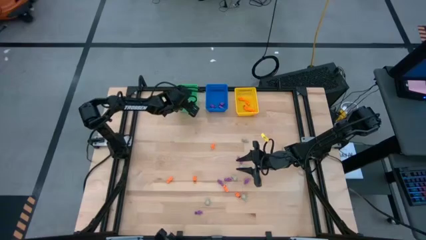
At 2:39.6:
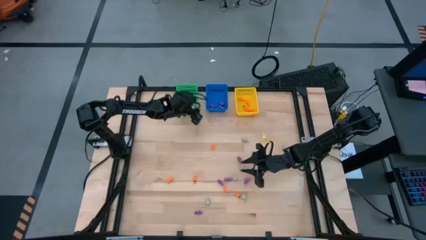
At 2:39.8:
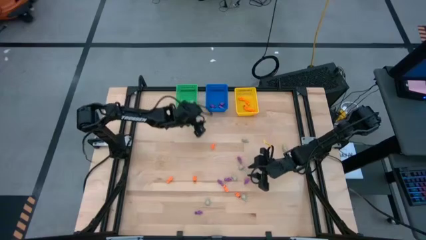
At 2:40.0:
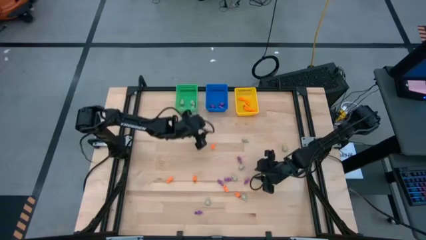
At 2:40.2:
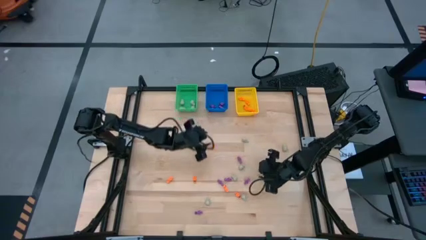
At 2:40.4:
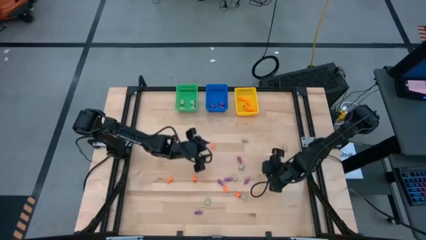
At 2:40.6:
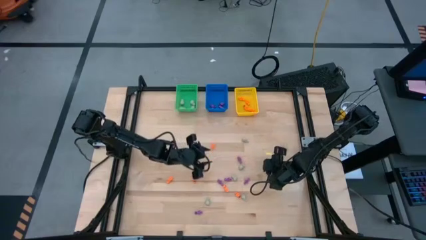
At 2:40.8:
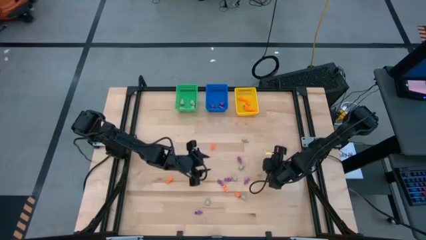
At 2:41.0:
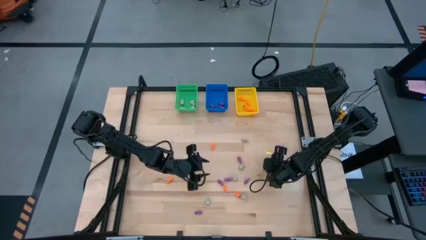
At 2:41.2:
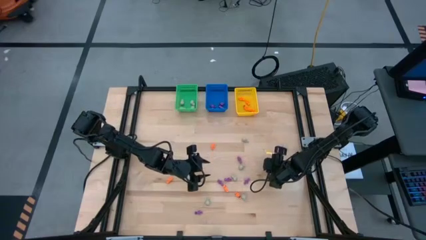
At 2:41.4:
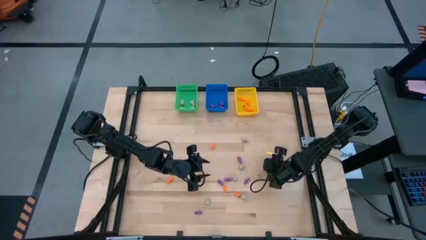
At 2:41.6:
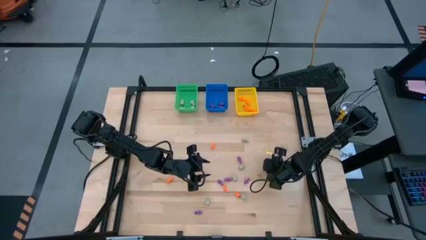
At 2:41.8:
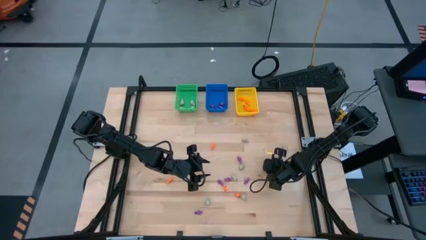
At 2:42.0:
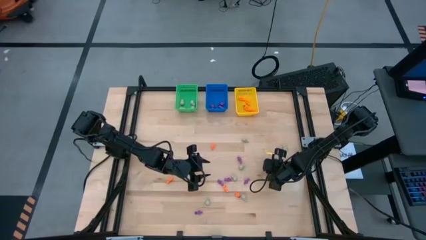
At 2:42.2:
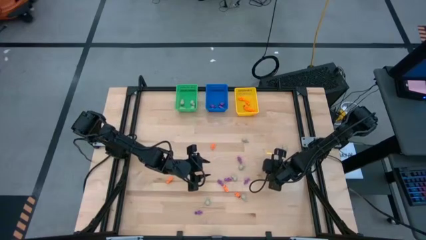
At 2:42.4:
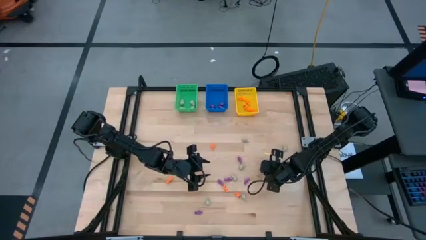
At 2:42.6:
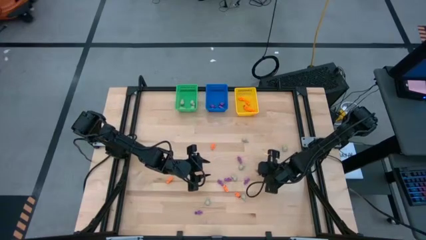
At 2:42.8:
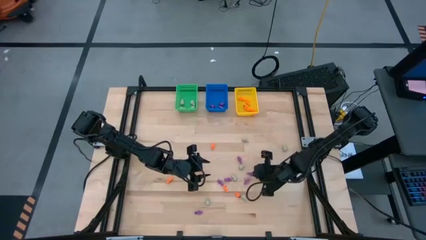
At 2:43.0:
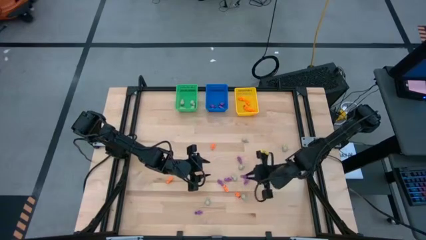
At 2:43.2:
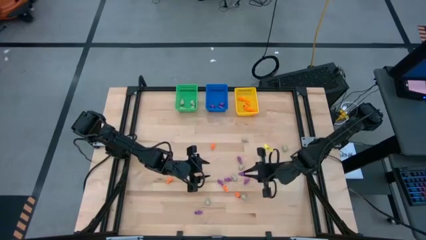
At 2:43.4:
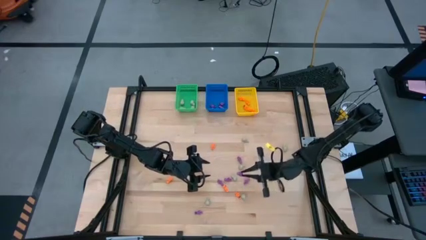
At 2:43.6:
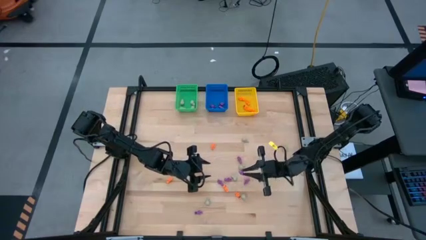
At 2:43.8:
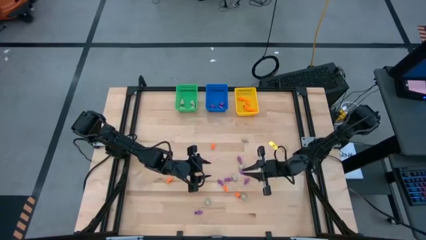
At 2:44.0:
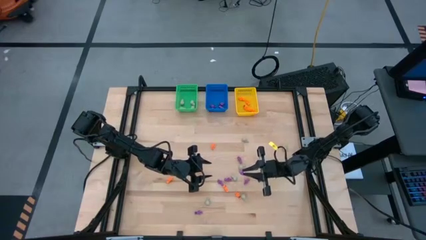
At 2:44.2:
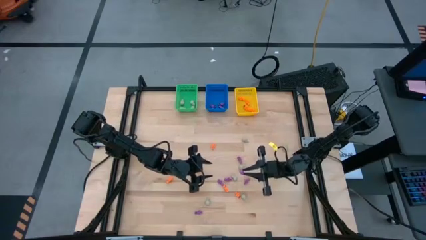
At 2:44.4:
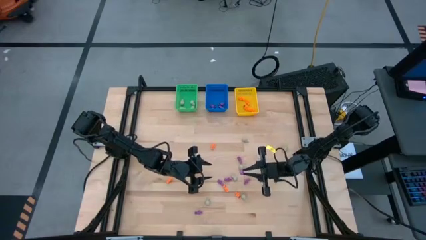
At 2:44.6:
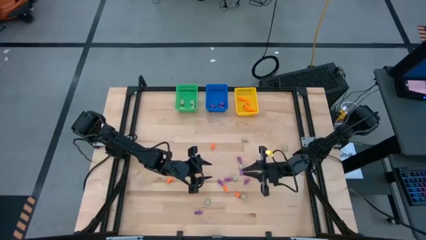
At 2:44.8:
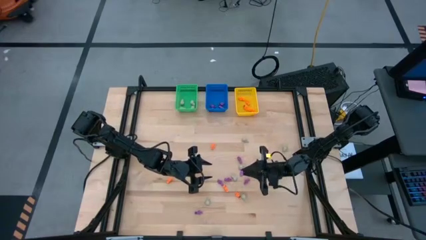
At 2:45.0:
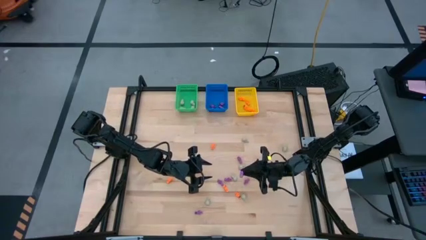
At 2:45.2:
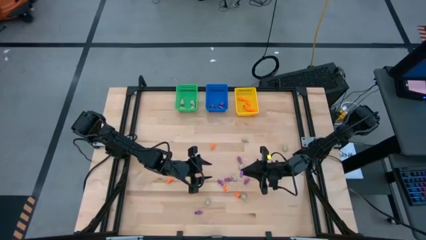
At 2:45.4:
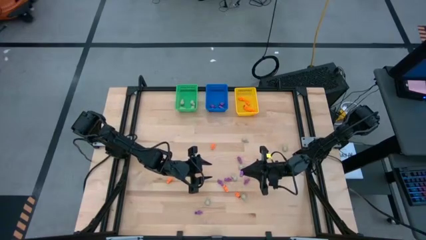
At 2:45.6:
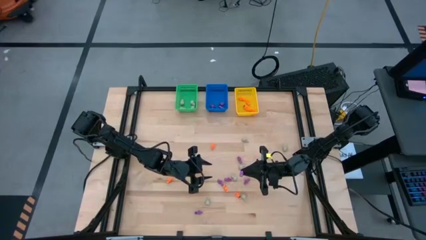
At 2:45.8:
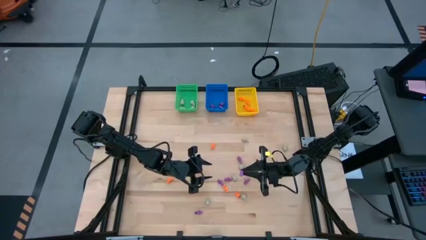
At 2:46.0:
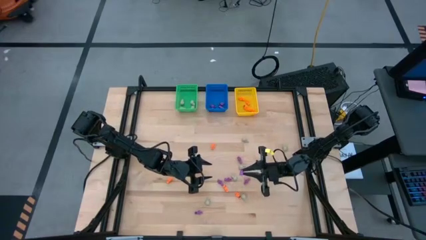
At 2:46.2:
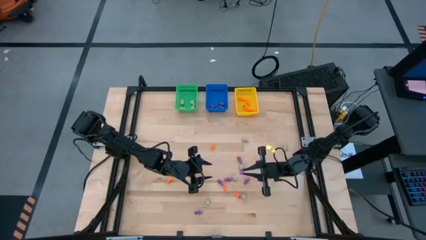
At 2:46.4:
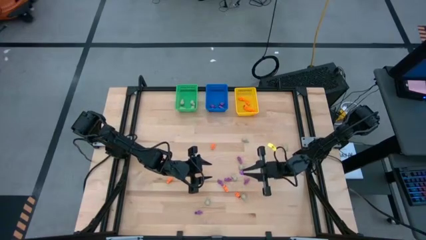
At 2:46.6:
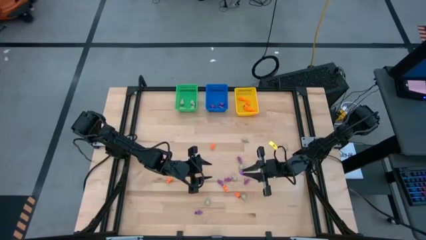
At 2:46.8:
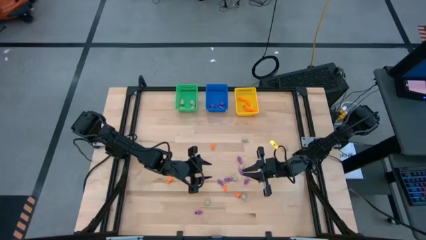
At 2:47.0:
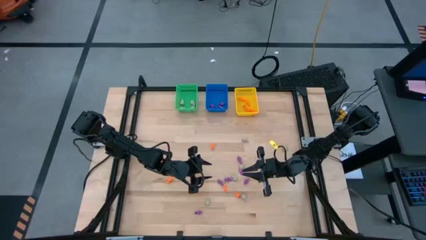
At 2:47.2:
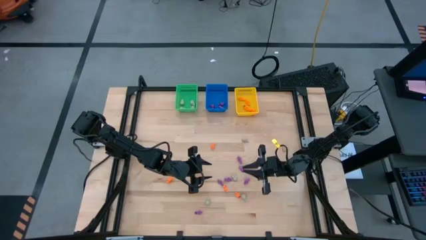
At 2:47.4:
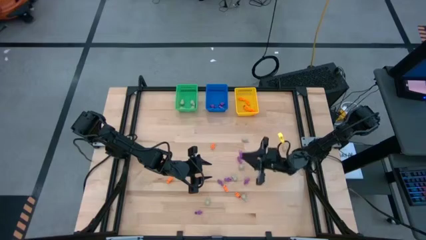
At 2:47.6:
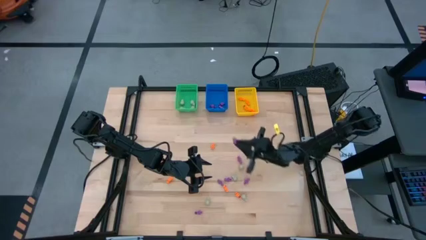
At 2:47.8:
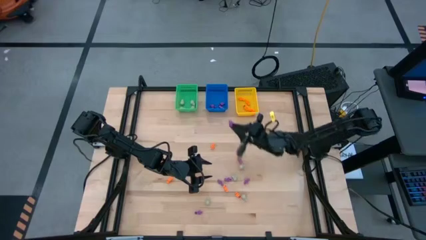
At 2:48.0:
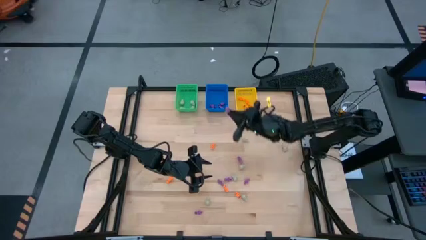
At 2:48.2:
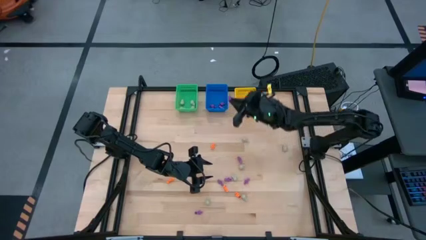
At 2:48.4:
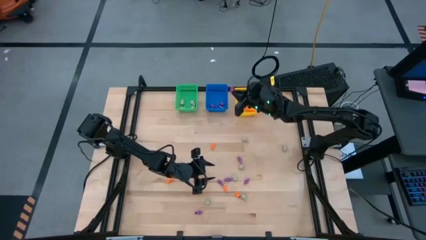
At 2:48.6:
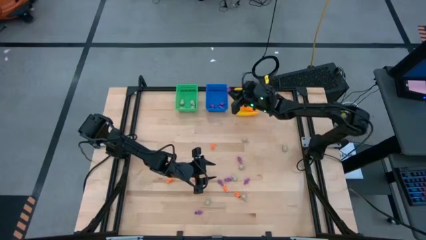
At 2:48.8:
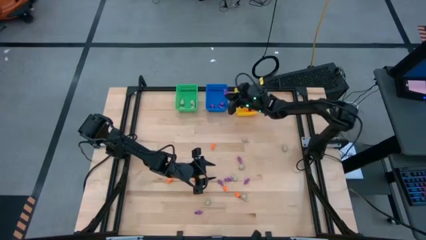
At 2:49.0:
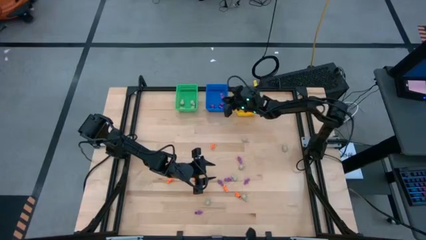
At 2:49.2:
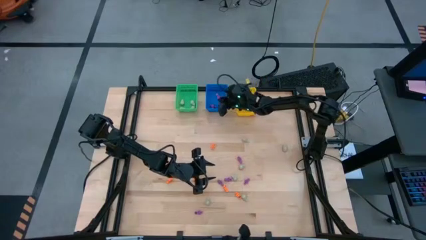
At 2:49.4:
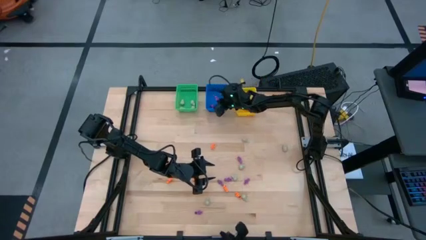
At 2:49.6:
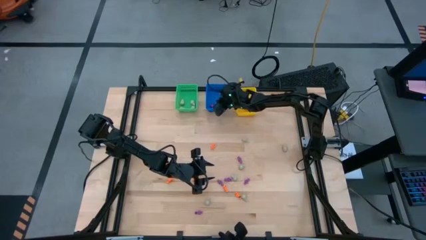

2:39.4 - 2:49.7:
Task: Sort Halloween decoration
Put the purple skeleton toy into the blue bin

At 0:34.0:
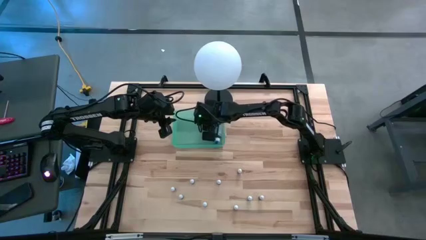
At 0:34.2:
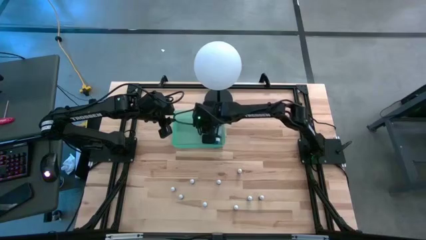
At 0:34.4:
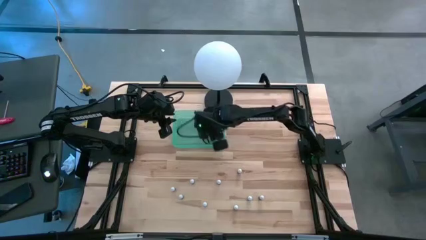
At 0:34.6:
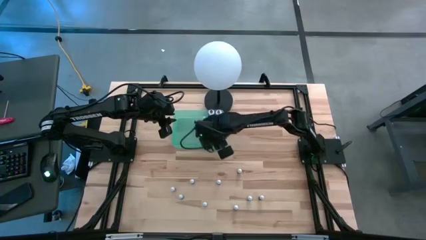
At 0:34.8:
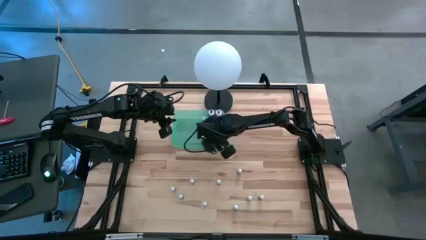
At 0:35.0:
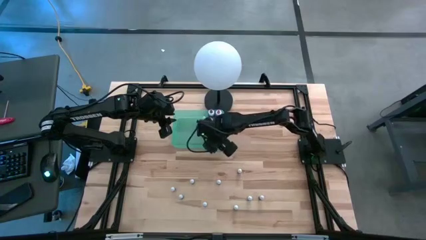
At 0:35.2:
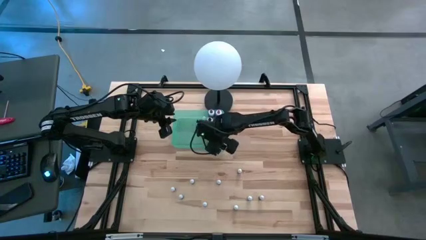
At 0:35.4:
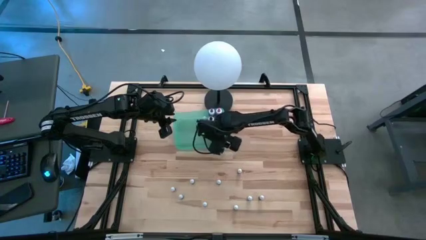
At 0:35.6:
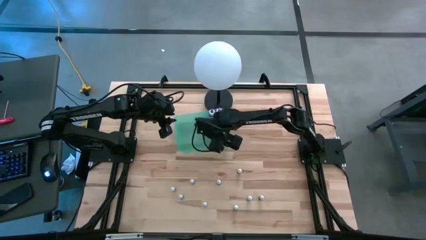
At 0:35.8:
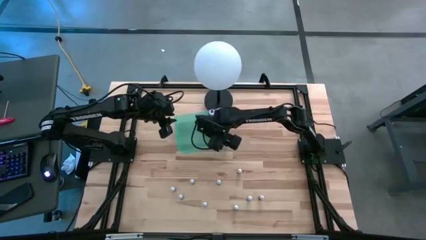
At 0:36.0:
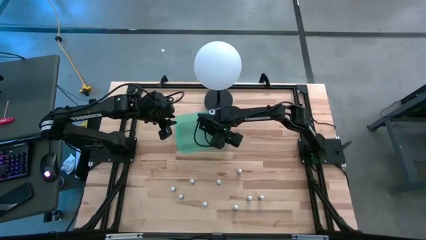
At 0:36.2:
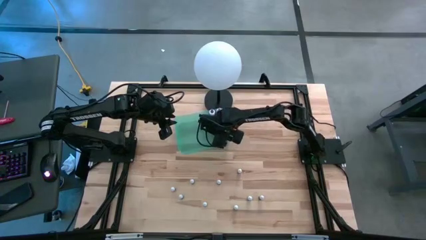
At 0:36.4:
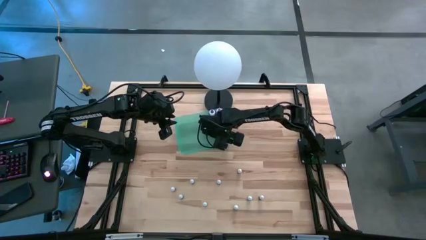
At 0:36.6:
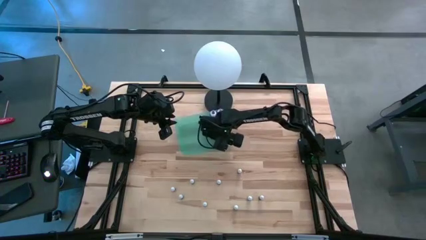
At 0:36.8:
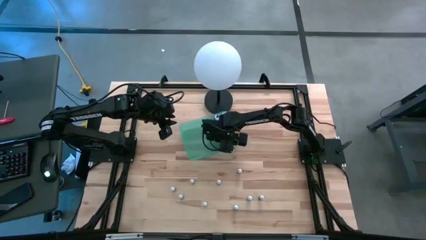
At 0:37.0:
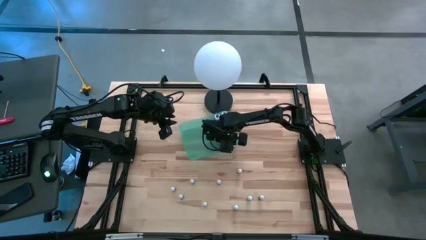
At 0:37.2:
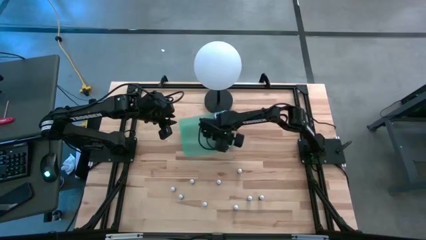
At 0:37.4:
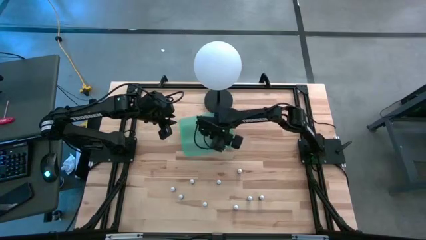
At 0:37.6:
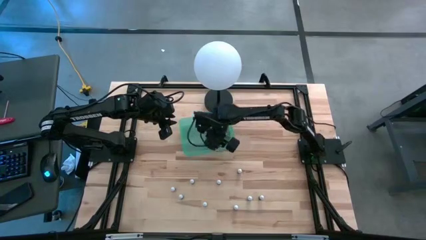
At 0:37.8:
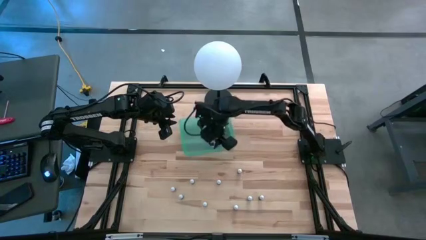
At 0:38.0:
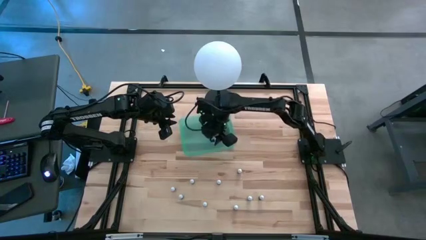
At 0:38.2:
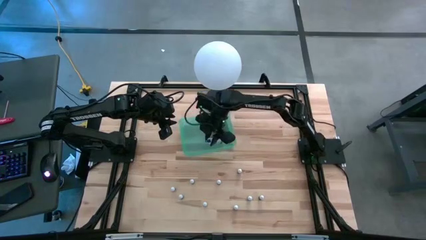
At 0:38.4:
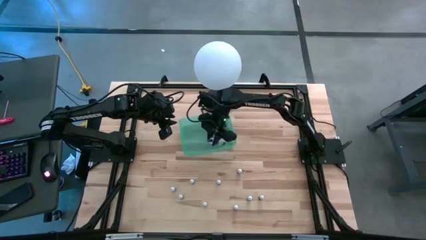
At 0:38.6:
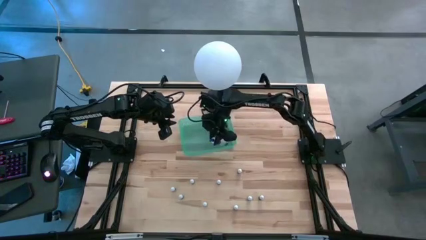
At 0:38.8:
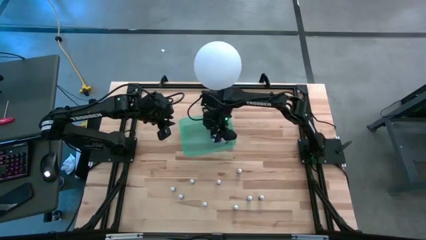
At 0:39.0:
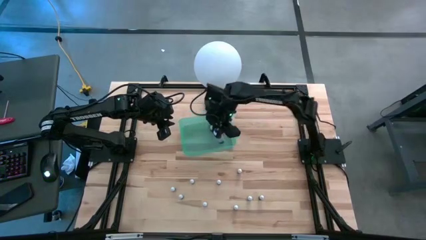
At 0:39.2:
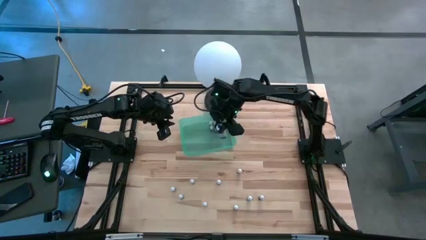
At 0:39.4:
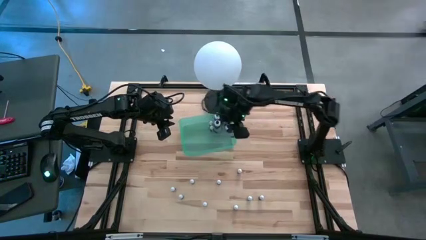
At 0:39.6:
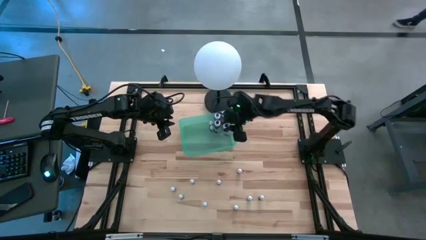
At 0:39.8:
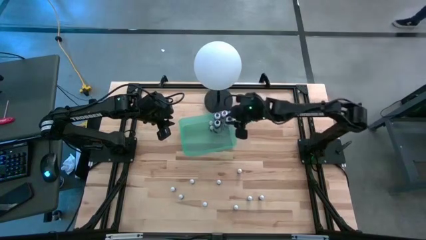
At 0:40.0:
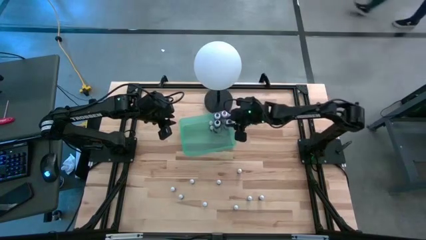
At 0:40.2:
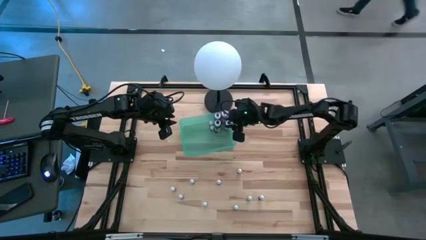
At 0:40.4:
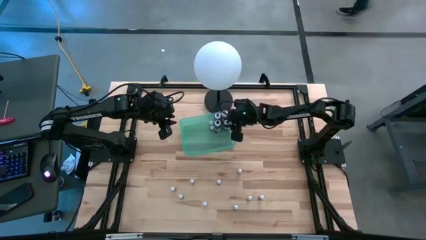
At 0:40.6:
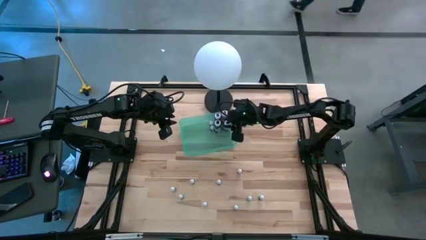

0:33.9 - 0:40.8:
Task: Pick & Place food coloring
Adjust the big blue food coloring bottle in the green bin
